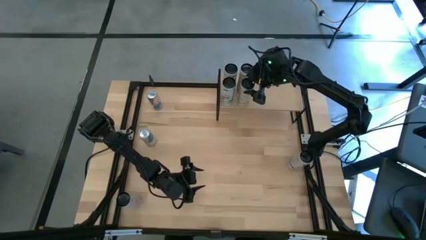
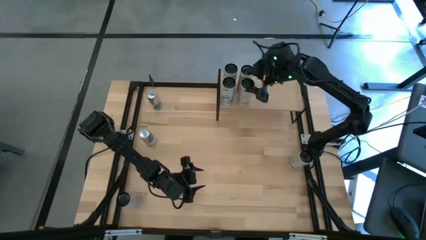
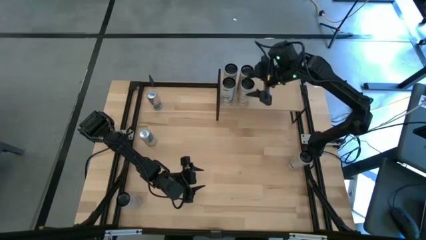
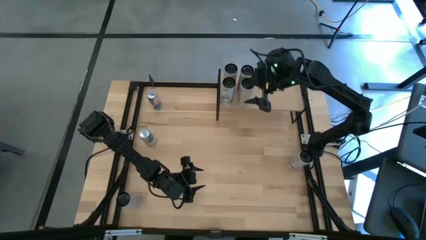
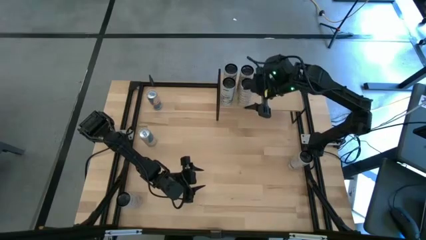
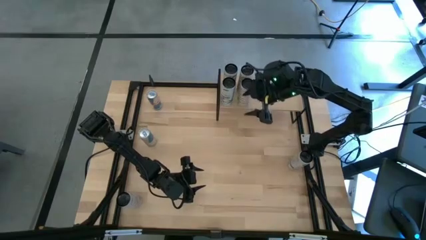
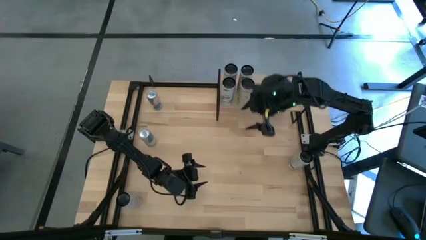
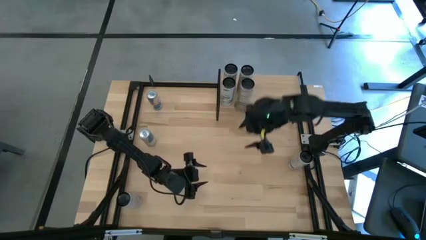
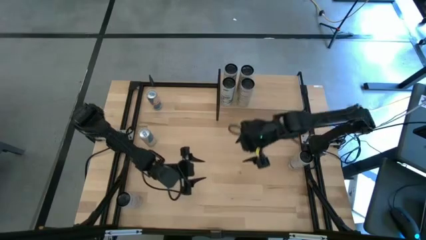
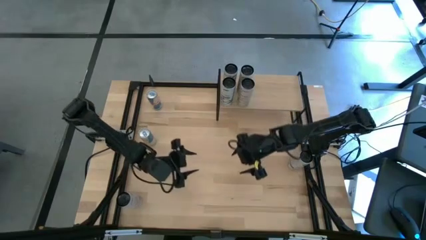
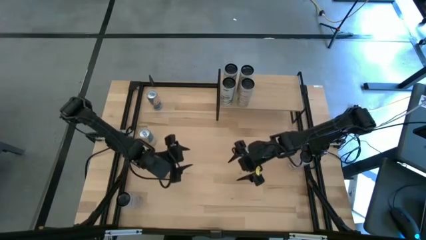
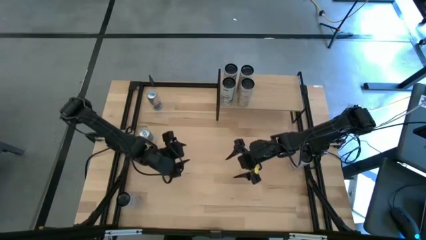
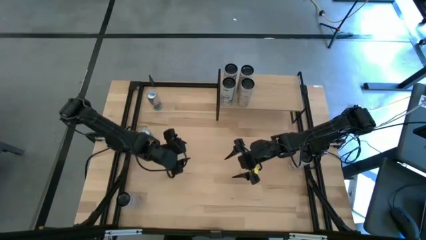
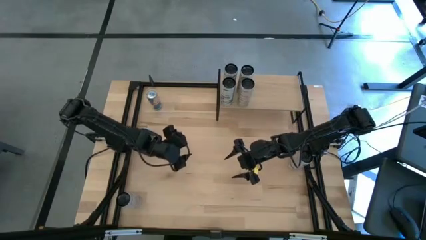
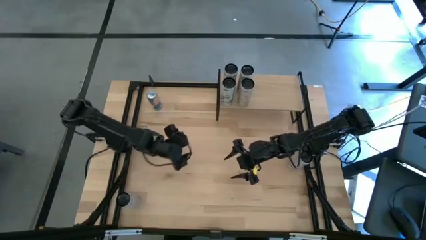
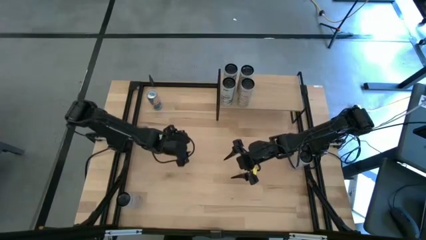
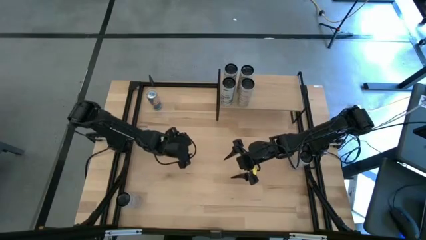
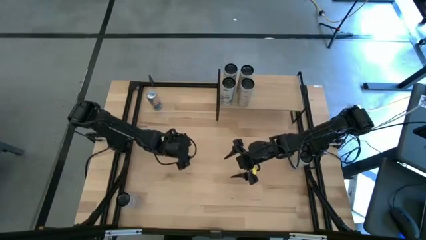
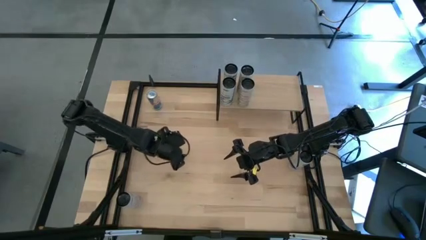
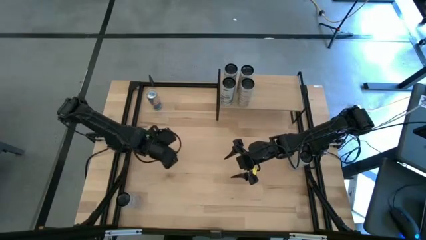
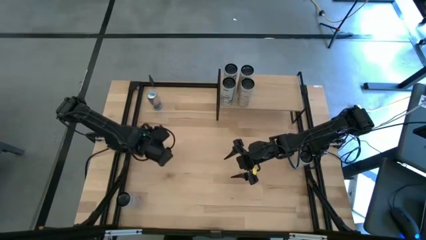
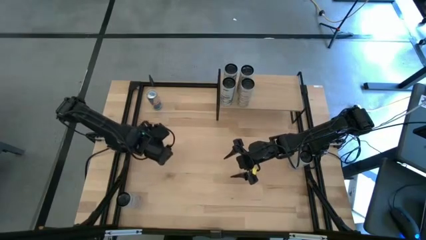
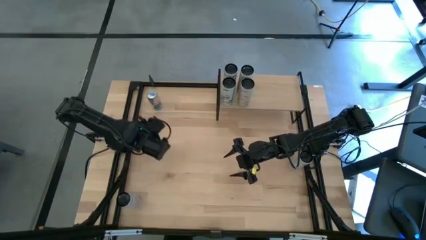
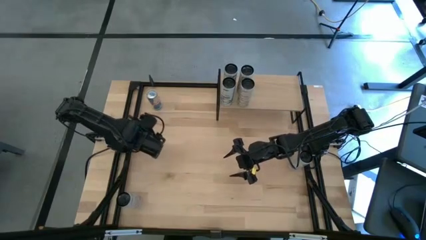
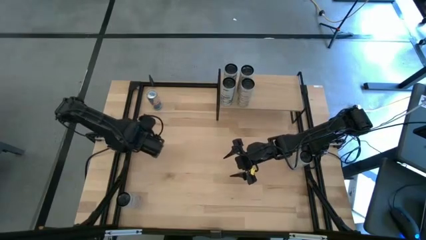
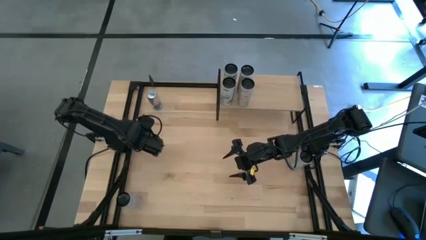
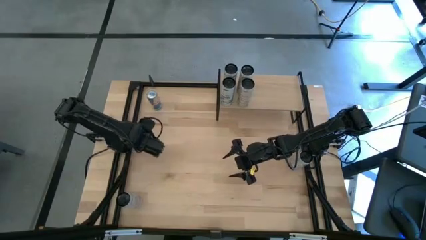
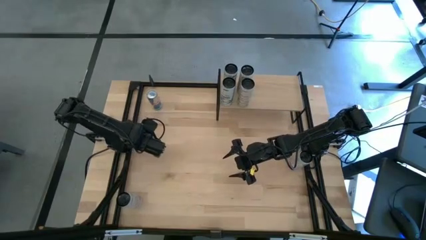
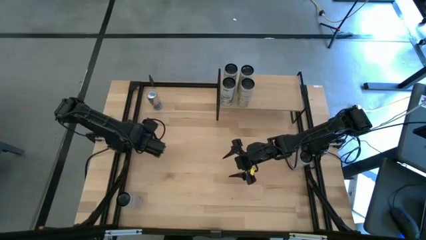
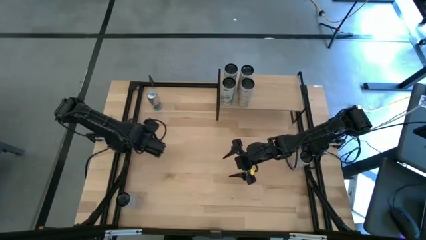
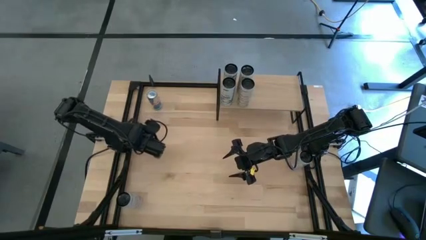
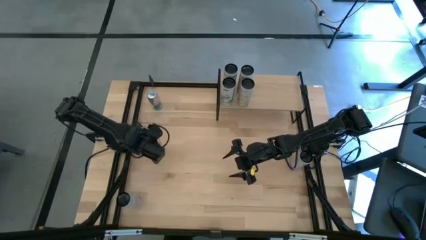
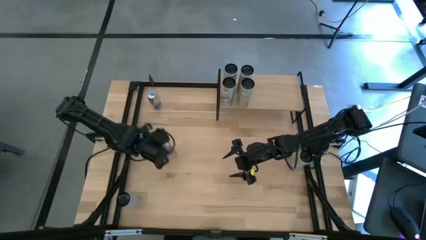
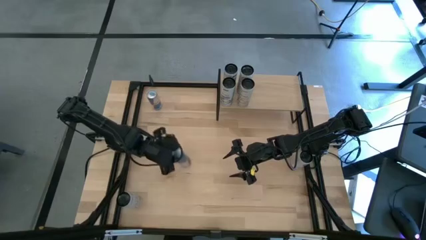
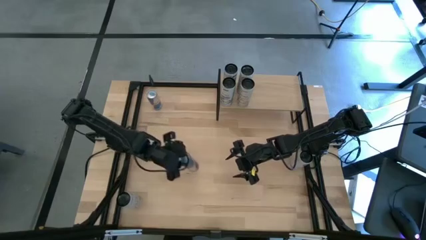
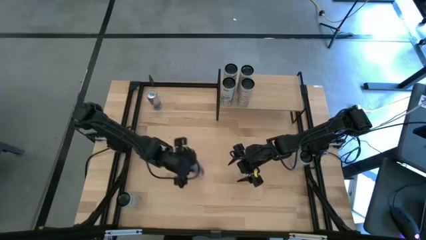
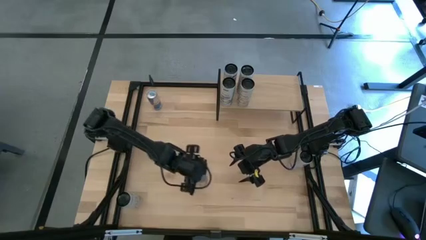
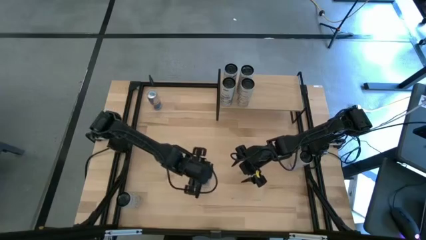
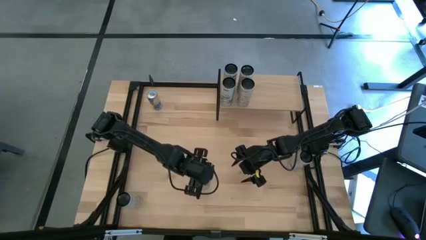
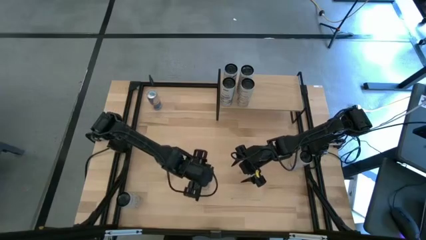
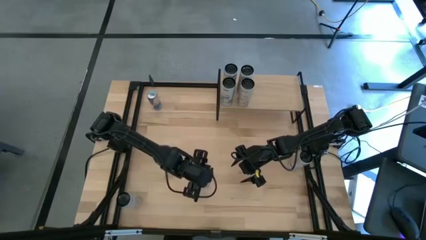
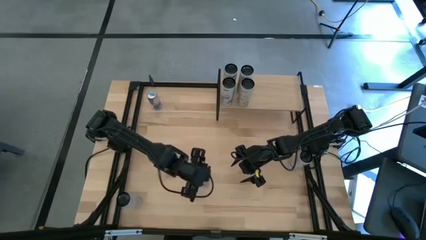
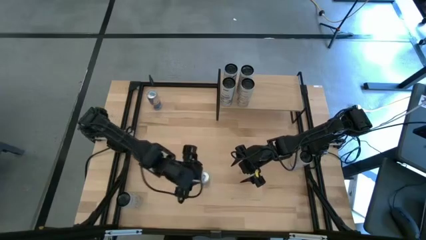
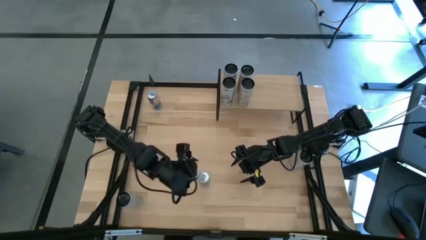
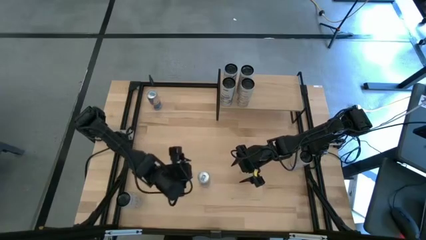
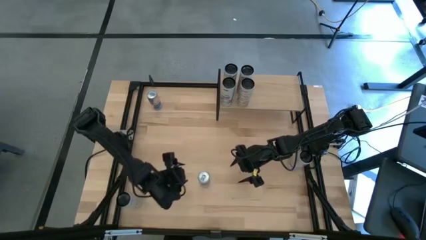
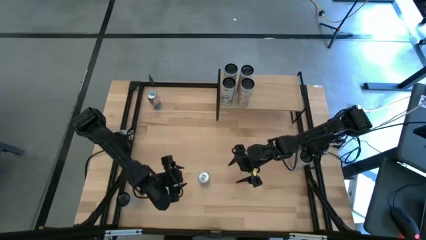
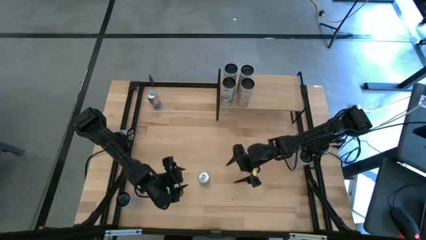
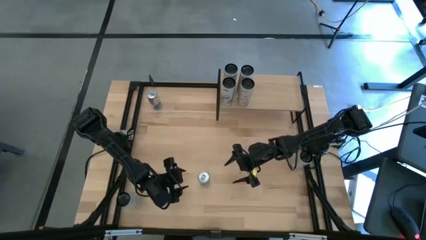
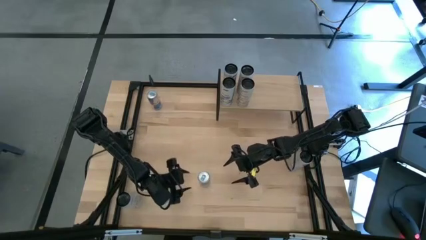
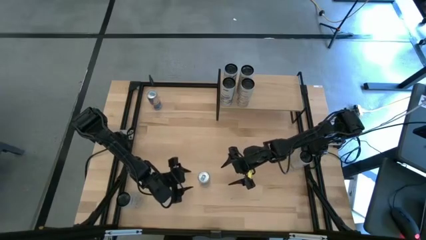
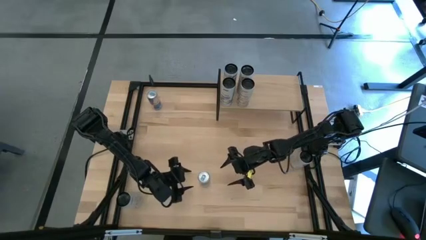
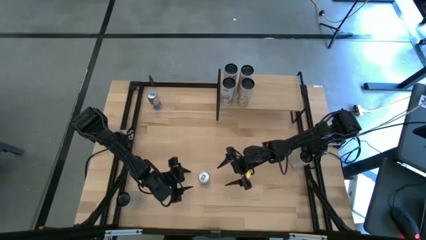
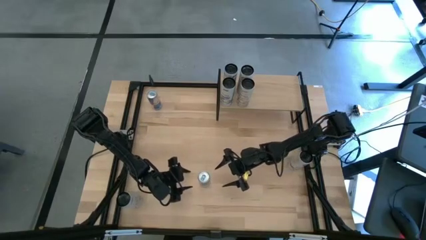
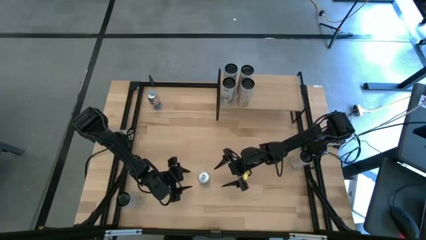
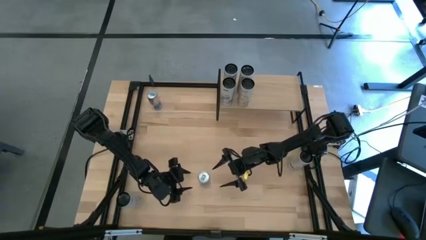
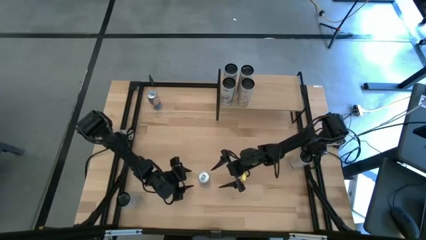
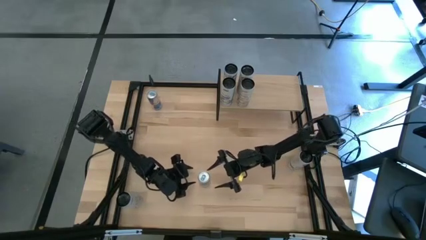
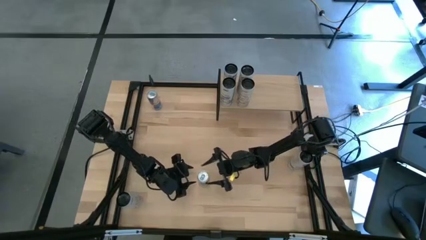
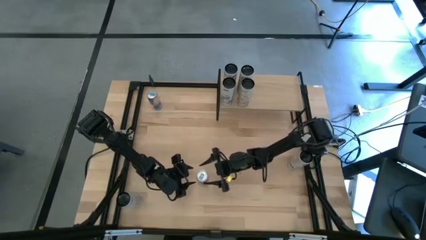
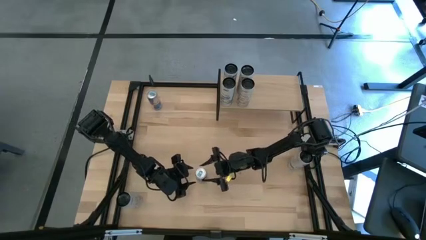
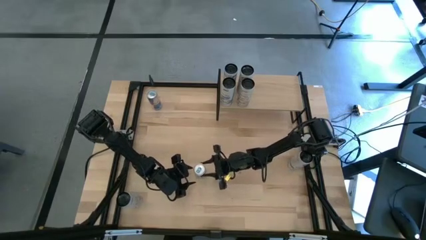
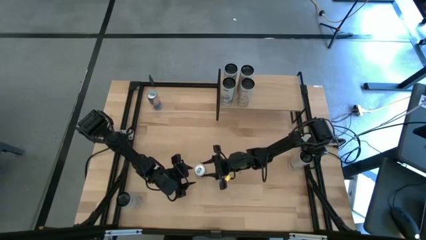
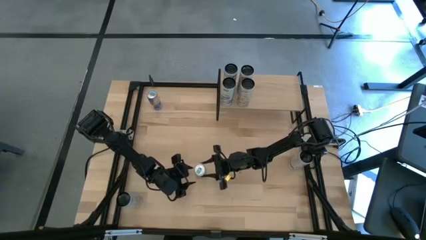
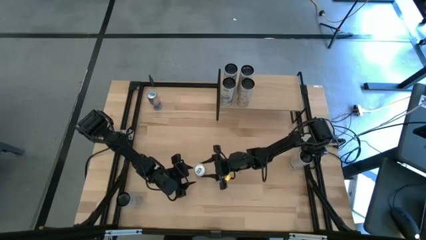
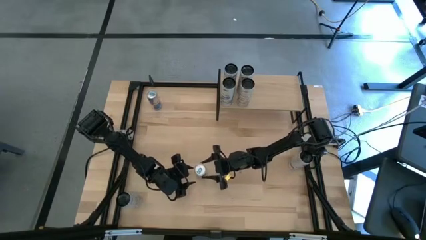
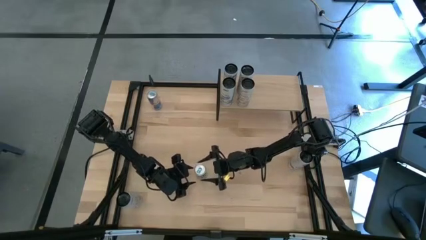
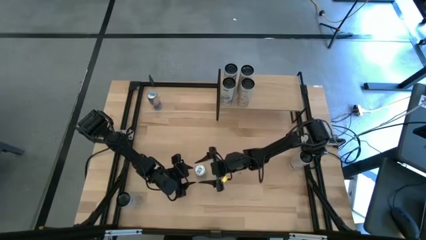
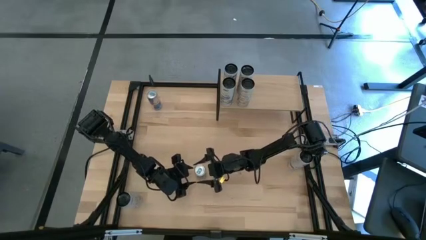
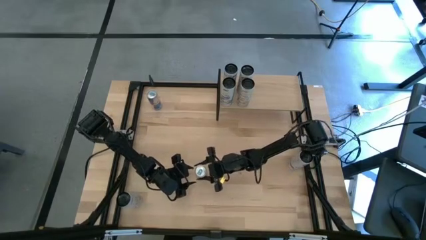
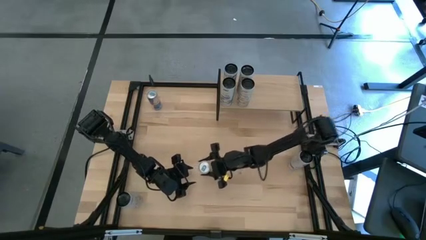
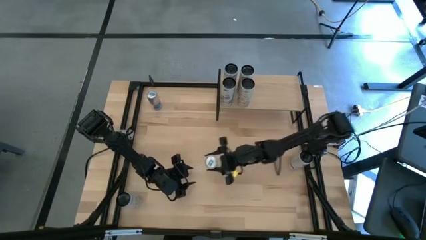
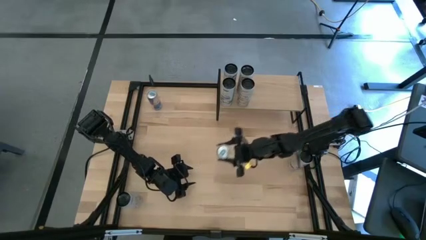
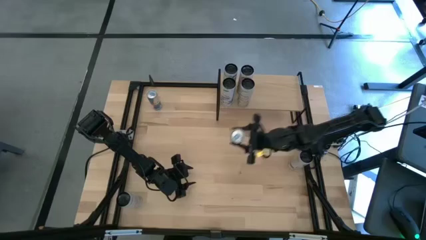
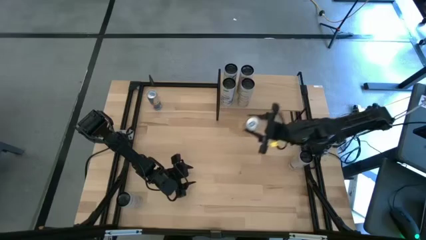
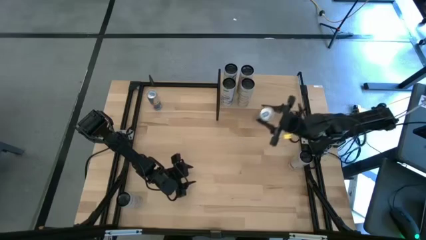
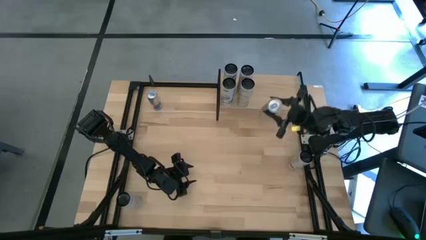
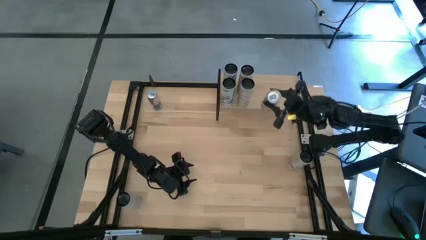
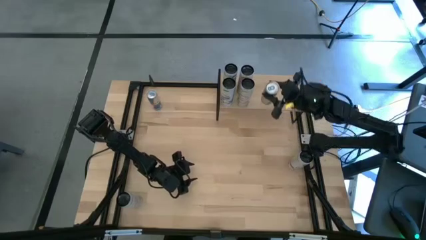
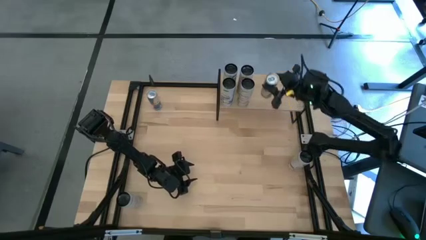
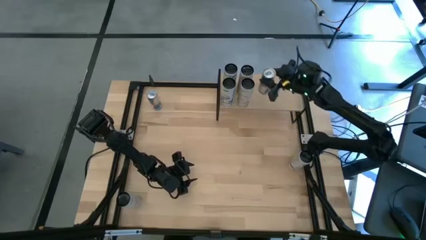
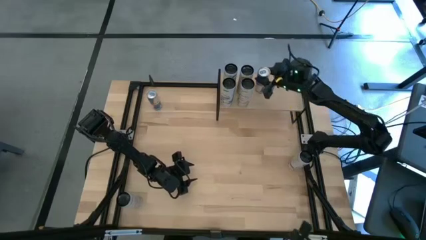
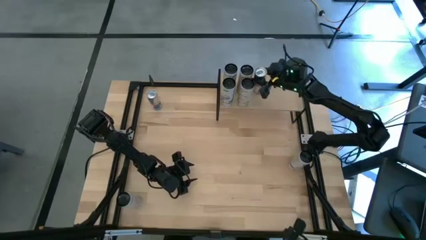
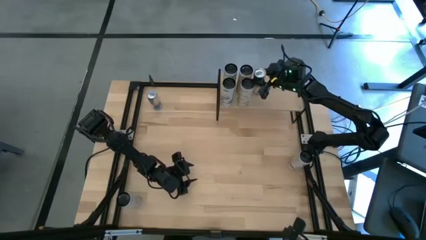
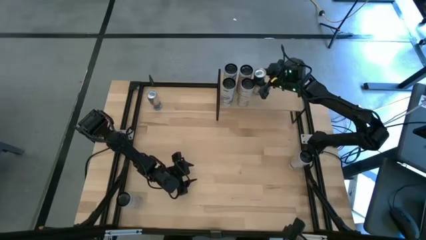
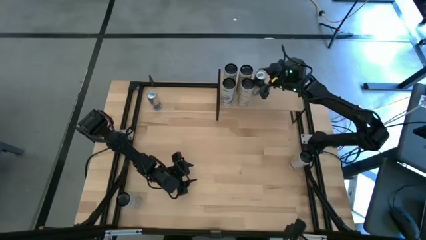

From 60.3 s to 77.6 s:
Task: Place canned beverage on shelf
Put the bottom blue soda can on the shelf
